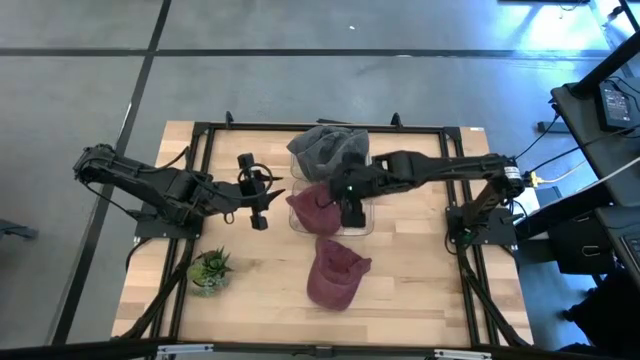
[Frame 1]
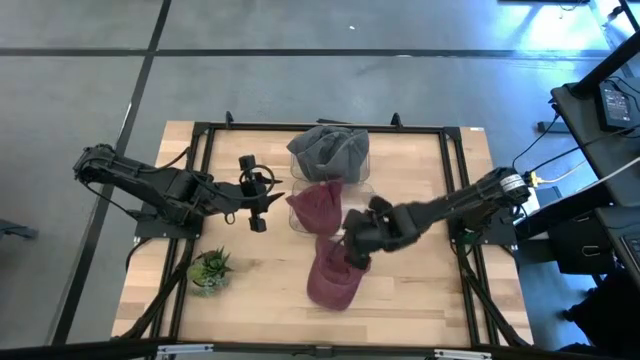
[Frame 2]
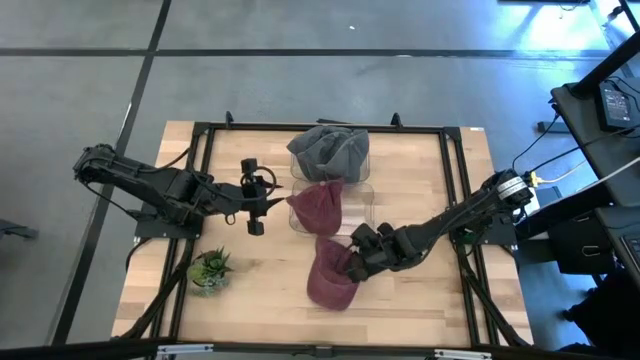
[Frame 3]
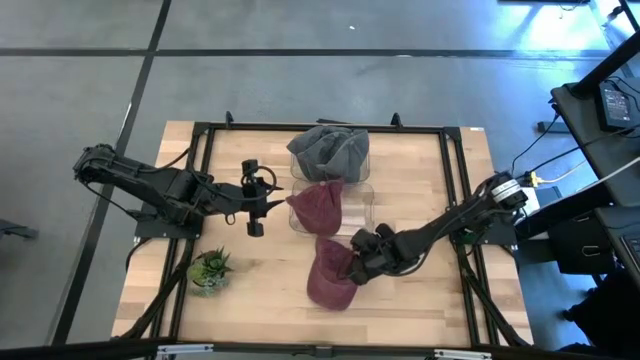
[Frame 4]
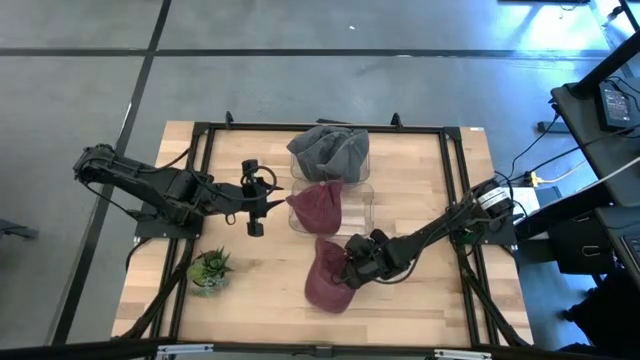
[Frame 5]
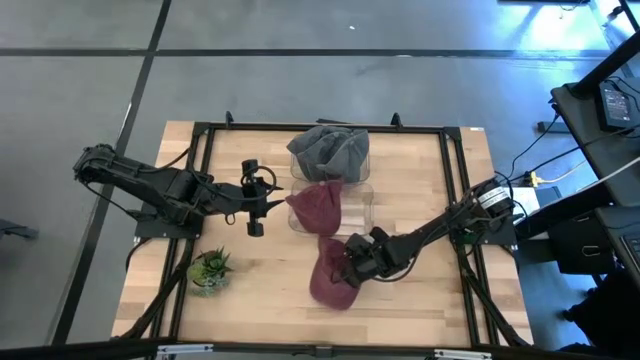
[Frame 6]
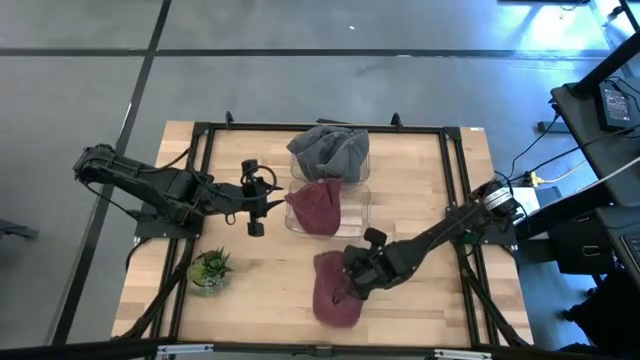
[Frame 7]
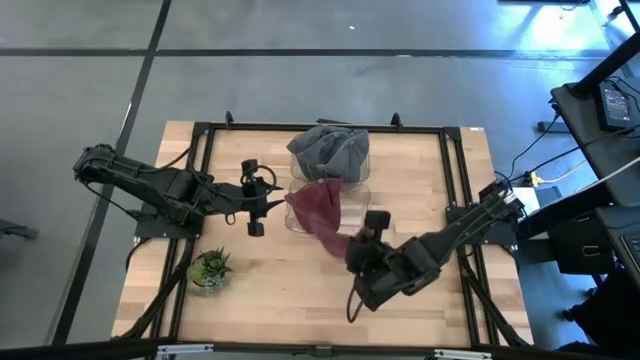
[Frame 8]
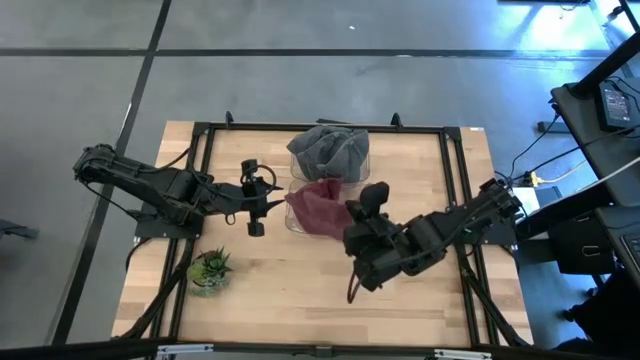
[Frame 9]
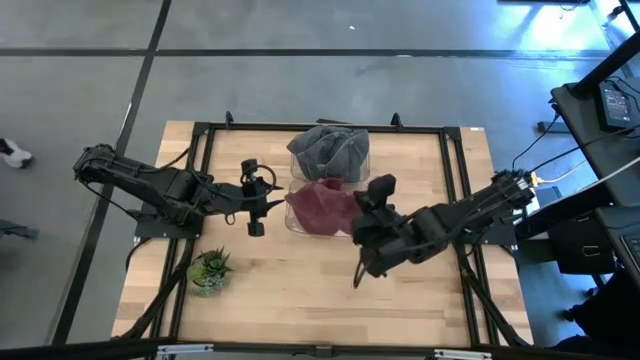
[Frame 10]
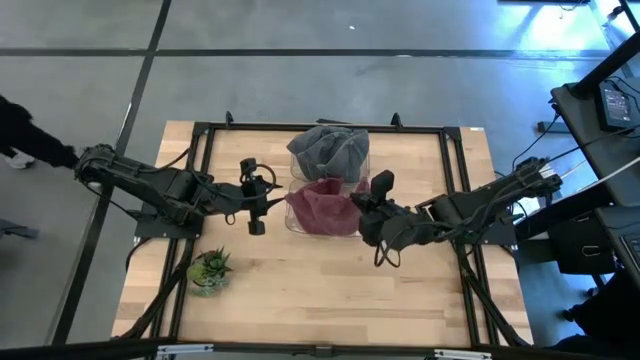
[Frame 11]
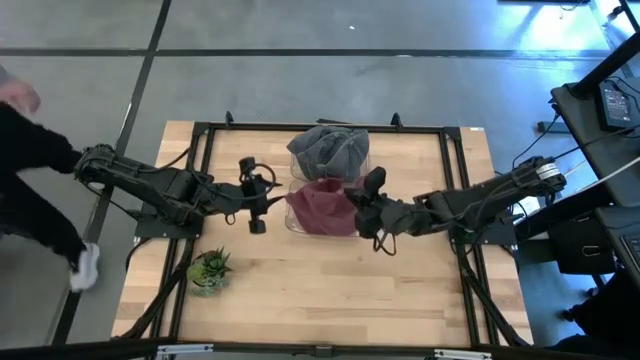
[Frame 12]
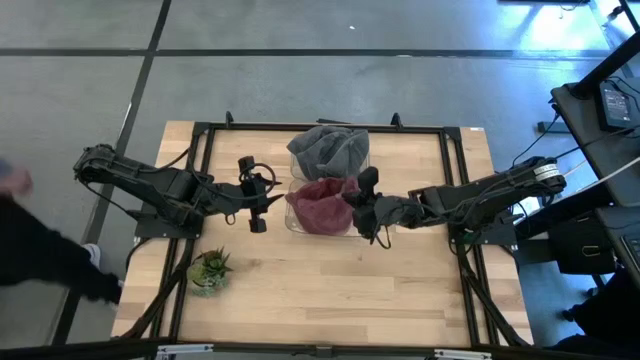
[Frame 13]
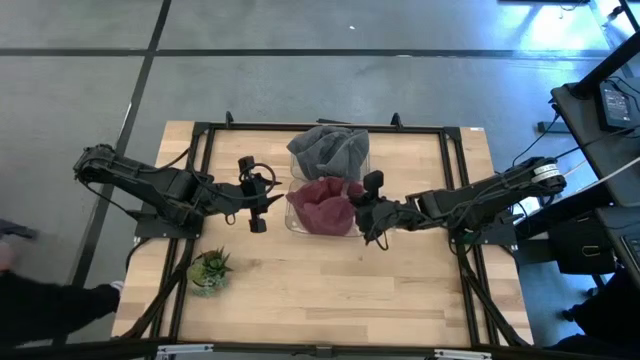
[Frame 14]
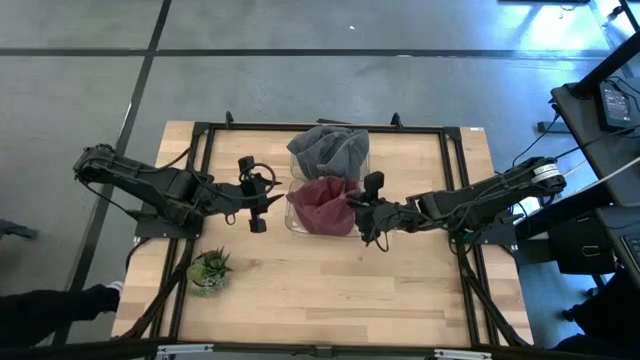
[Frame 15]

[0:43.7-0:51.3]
Task: Pick & Place hat
Put the red cap into the bottom transparent bin

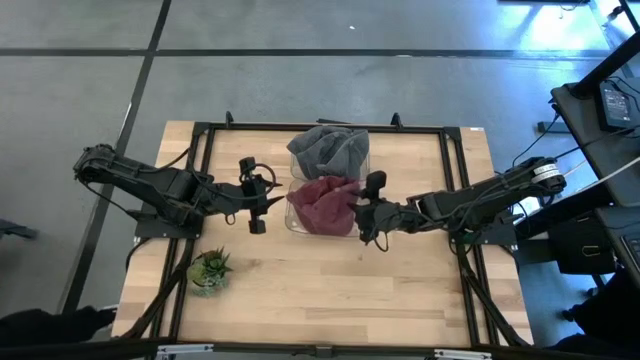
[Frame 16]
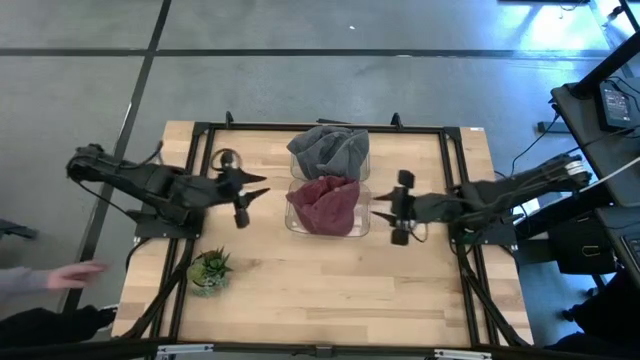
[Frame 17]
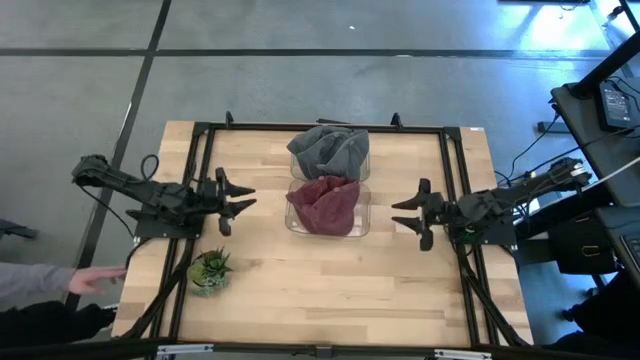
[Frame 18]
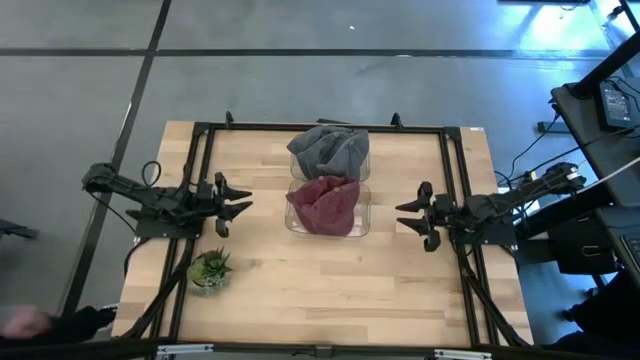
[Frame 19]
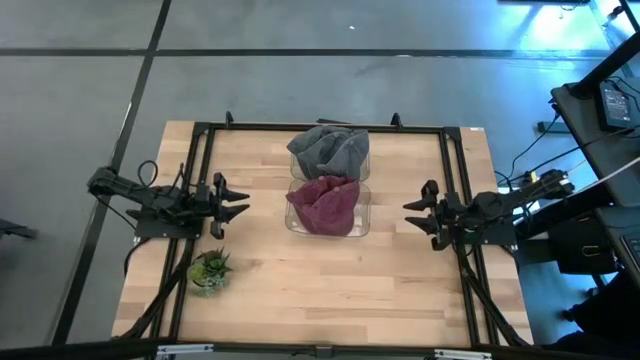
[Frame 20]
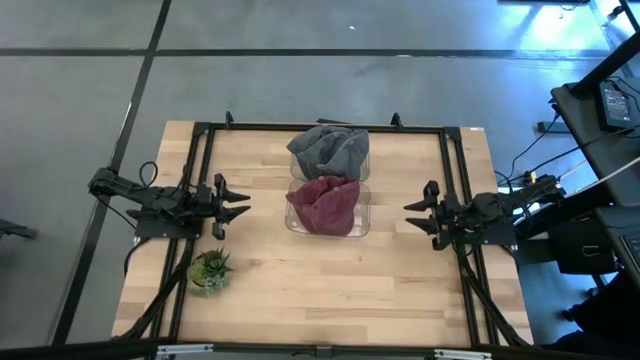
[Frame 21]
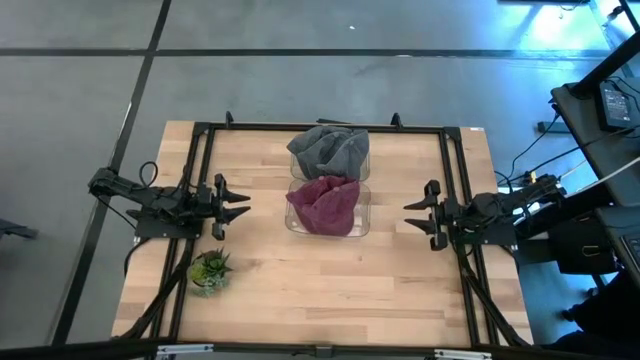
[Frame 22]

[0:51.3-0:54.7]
Return to Home Position
